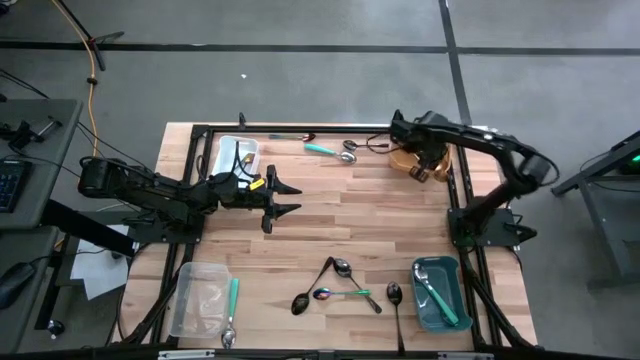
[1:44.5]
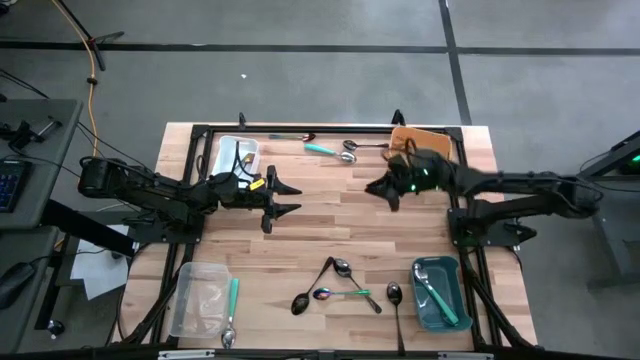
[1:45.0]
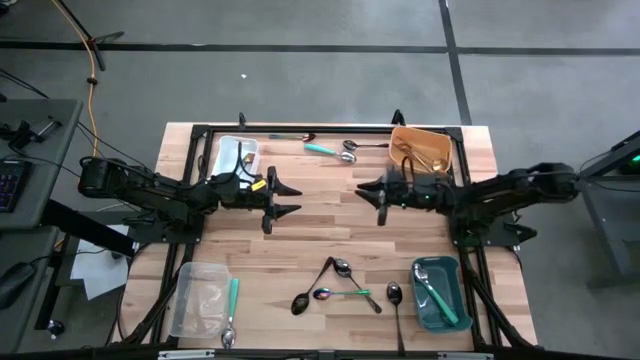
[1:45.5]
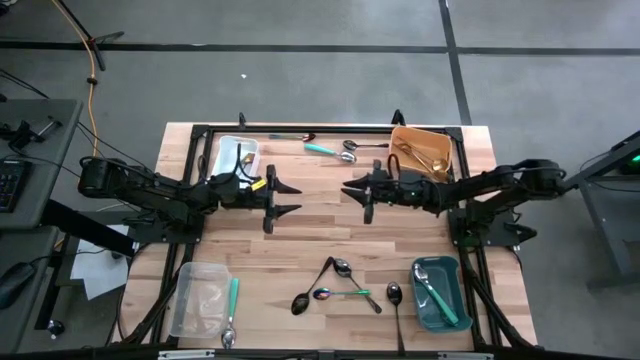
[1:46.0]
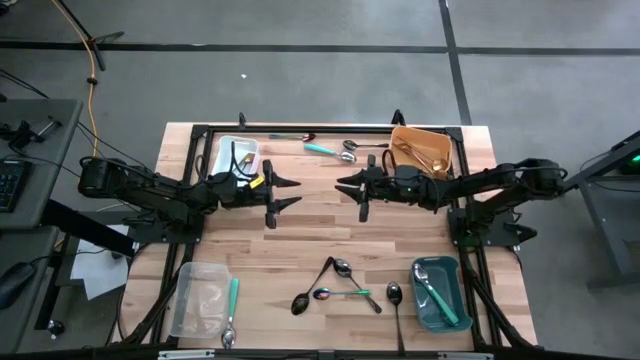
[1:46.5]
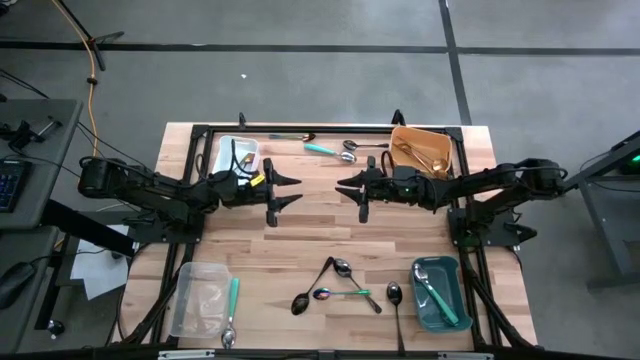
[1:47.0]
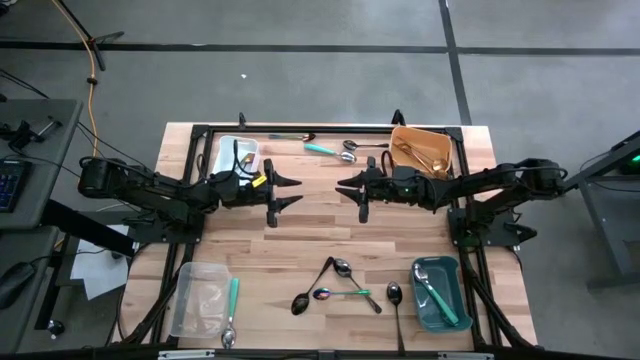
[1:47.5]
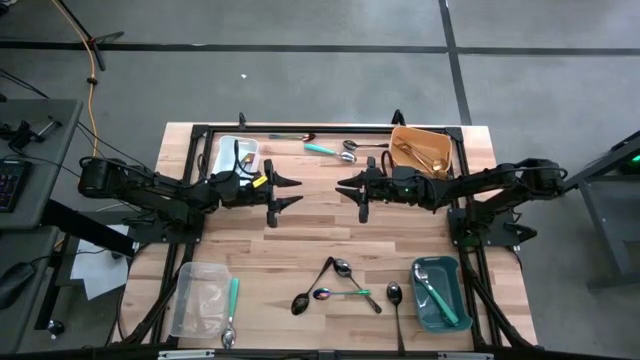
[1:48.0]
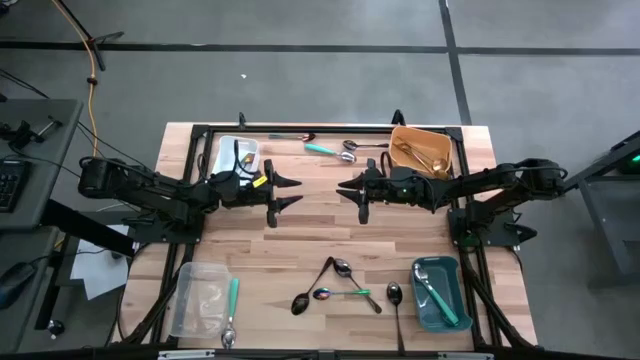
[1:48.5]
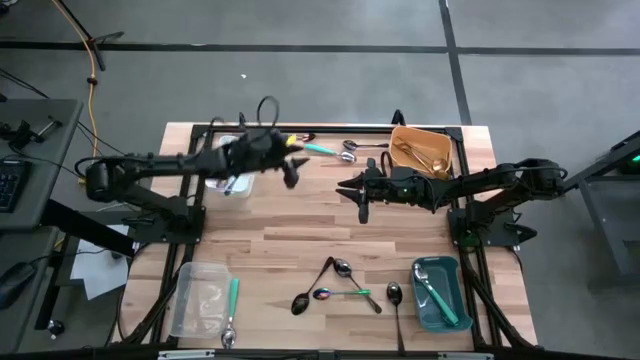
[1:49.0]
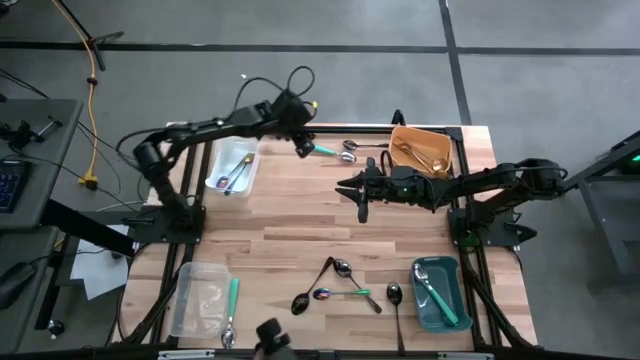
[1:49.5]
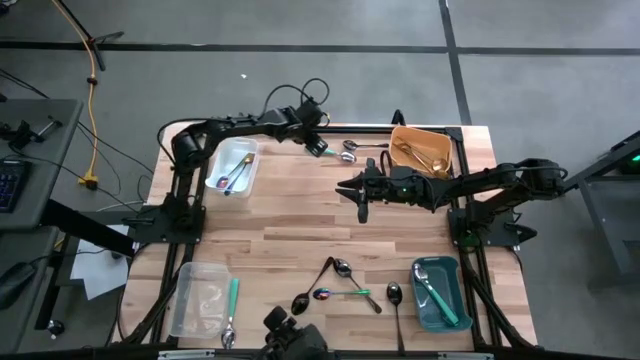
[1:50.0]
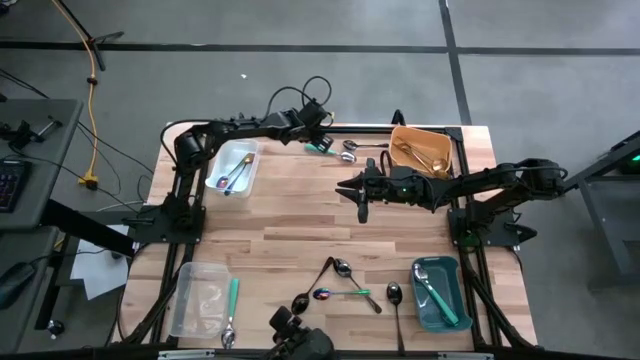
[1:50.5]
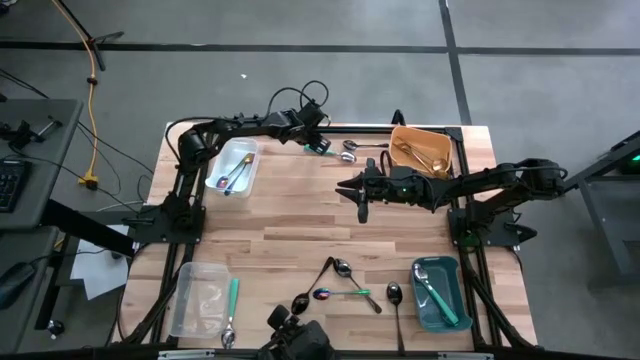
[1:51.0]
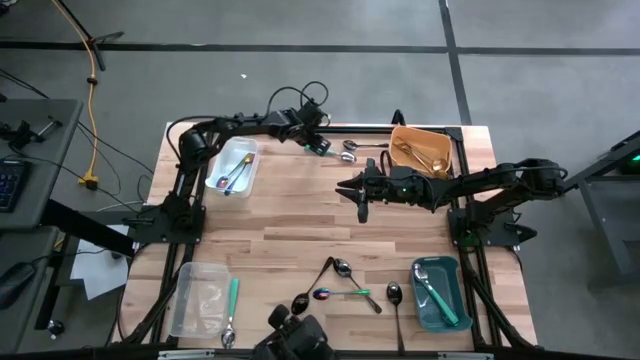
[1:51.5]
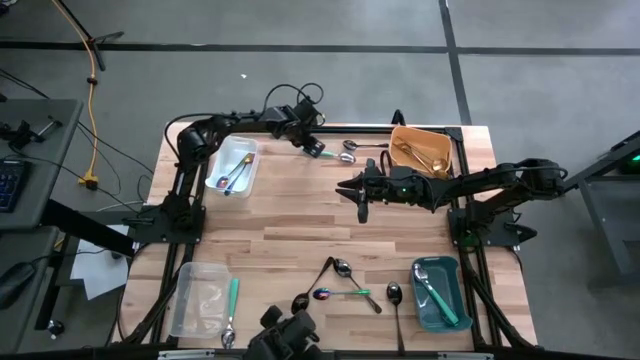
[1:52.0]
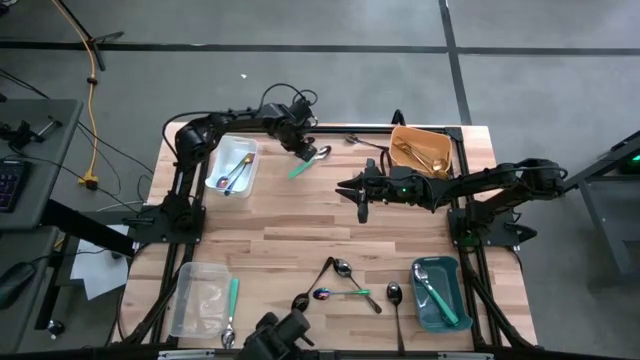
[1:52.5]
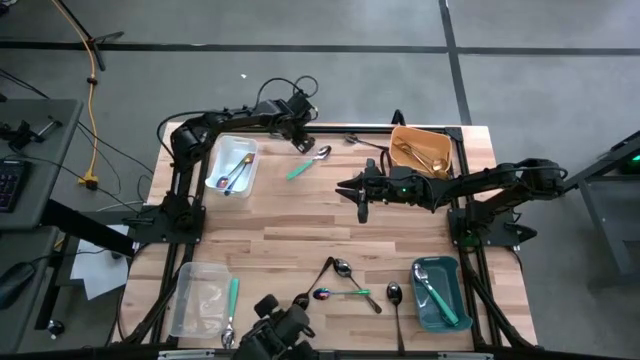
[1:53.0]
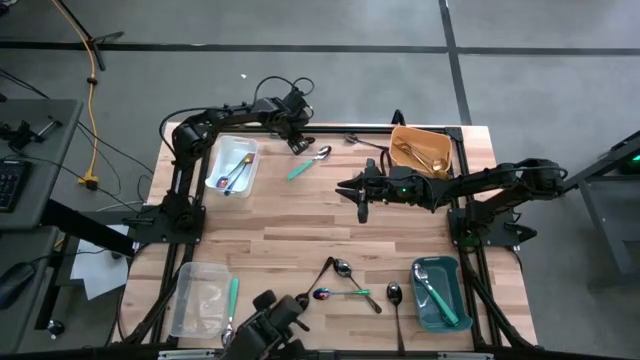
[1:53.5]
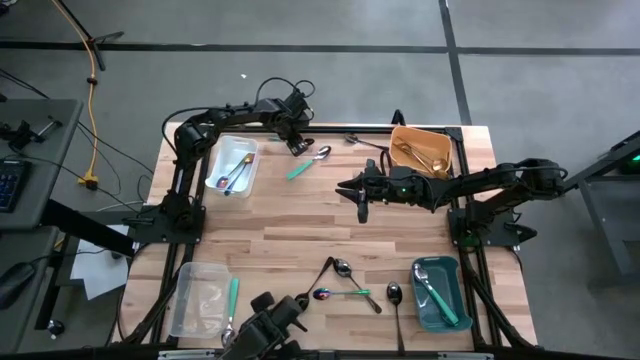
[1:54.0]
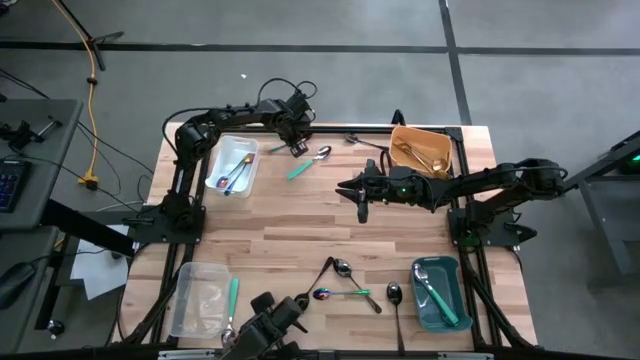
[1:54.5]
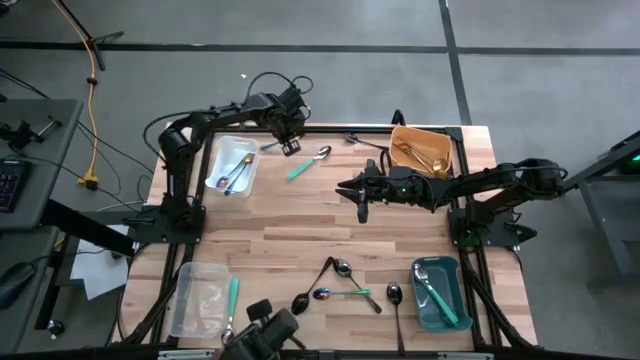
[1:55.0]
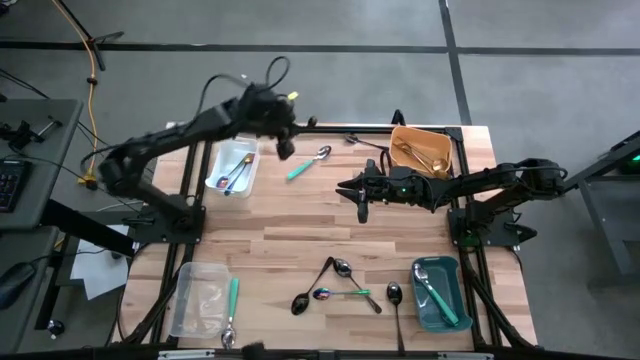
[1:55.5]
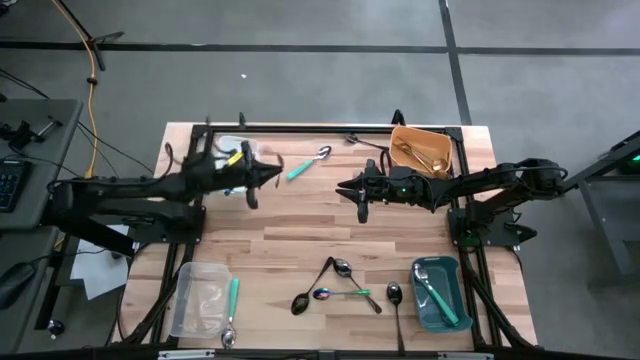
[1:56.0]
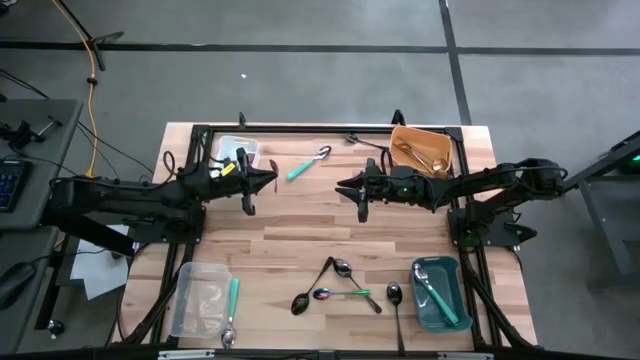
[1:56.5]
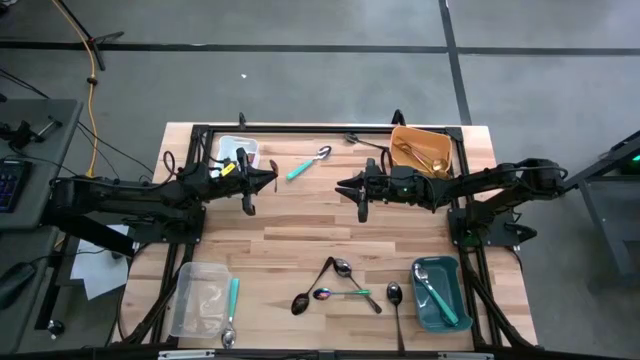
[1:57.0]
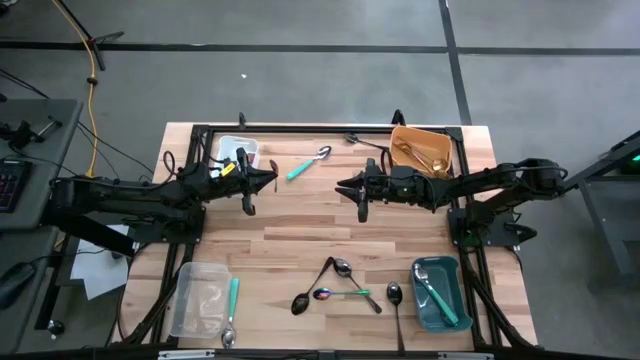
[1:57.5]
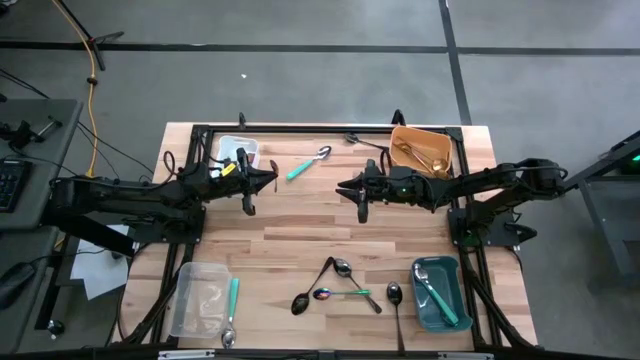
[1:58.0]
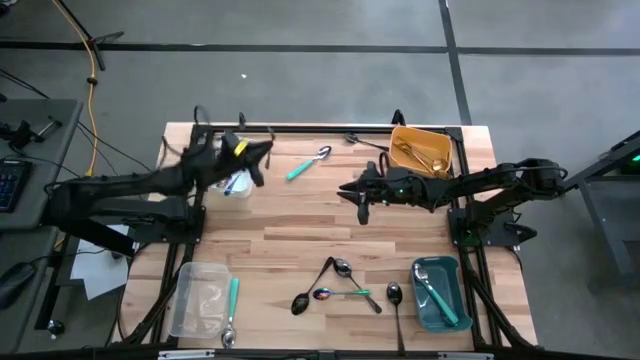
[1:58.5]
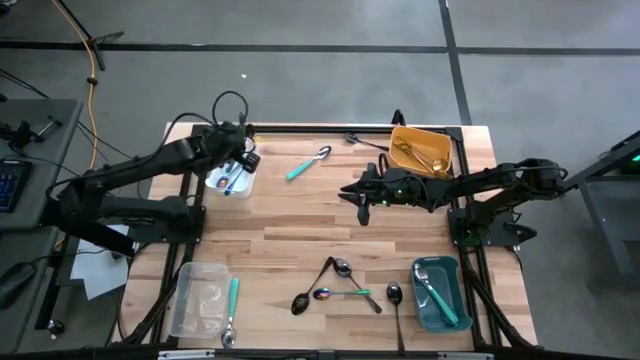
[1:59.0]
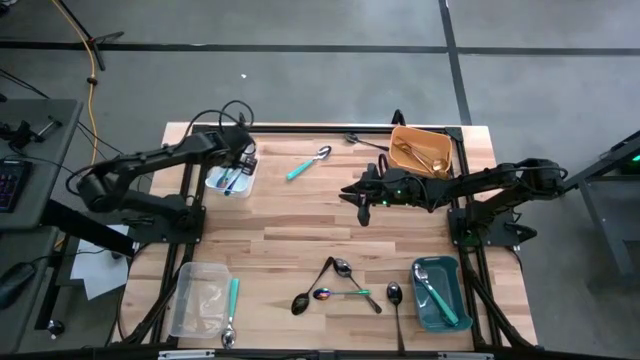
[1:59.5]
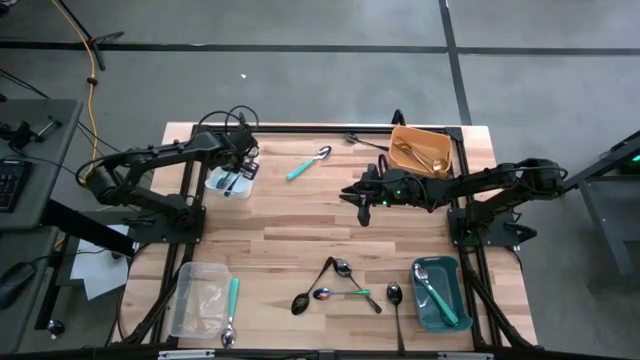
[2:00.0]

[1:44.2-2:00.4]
Task: Sort silverware by color (type)
Put the violet spoon into the white bin
